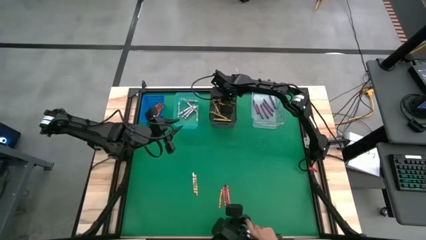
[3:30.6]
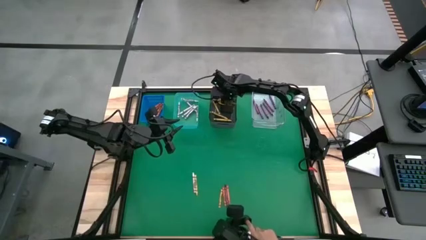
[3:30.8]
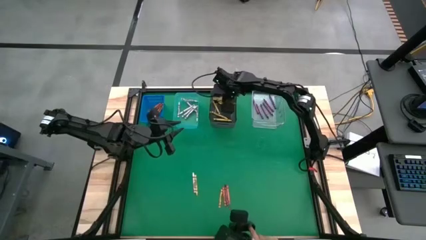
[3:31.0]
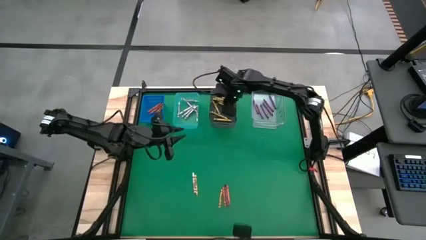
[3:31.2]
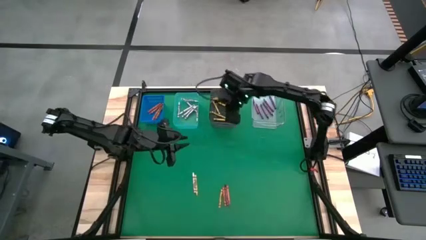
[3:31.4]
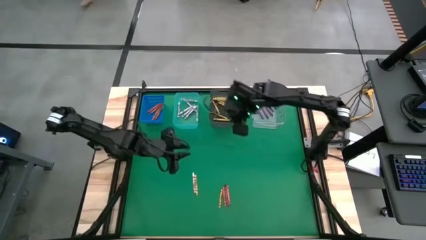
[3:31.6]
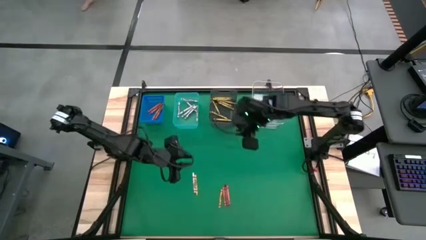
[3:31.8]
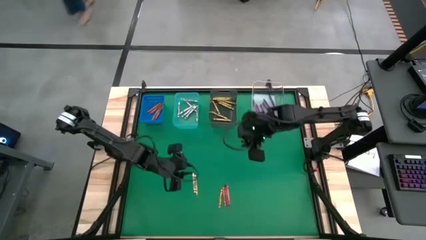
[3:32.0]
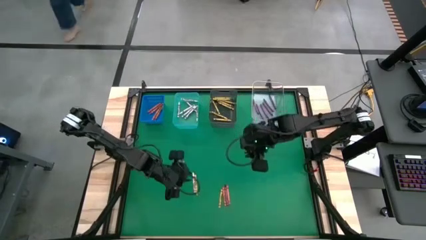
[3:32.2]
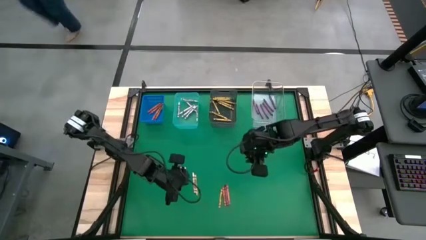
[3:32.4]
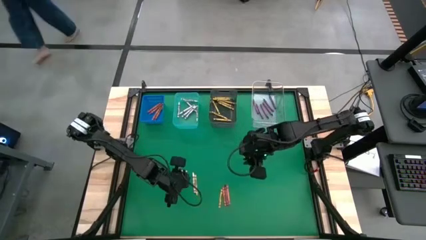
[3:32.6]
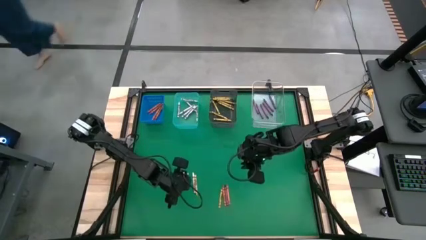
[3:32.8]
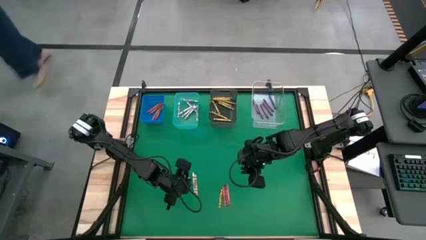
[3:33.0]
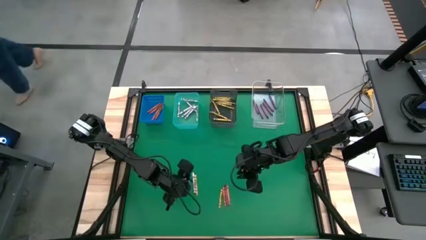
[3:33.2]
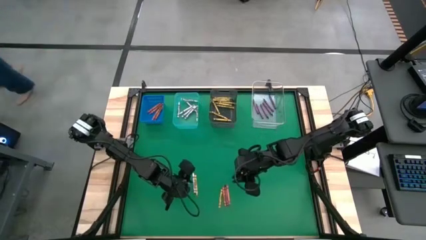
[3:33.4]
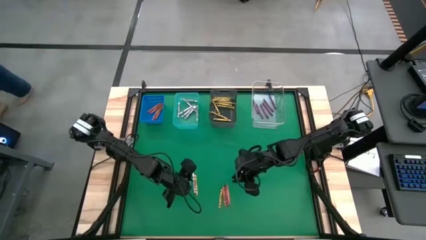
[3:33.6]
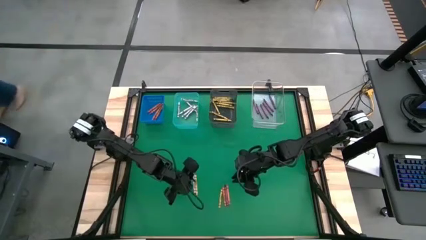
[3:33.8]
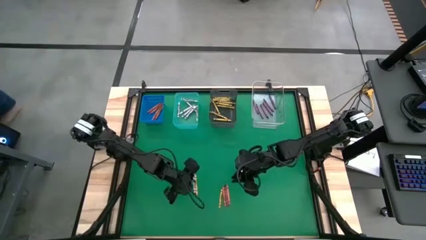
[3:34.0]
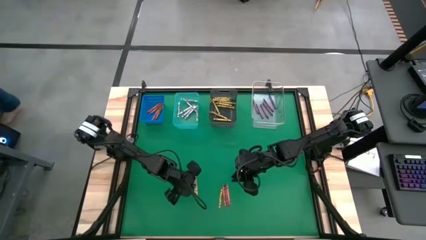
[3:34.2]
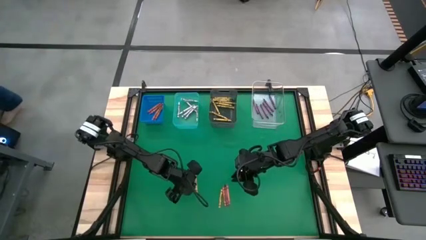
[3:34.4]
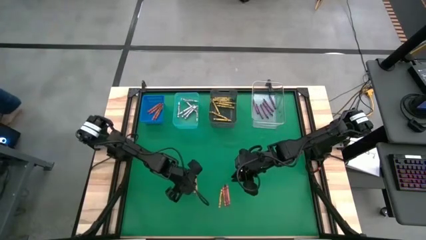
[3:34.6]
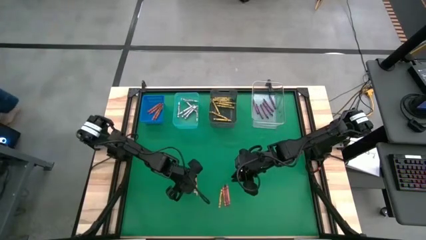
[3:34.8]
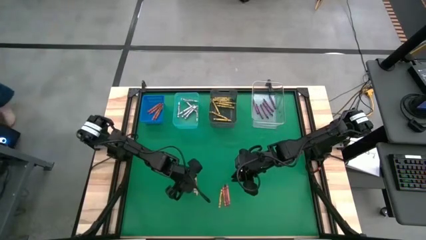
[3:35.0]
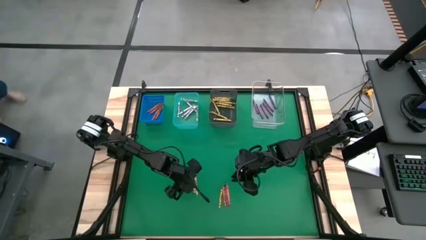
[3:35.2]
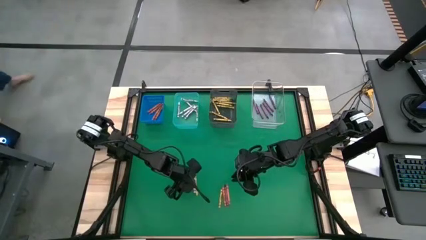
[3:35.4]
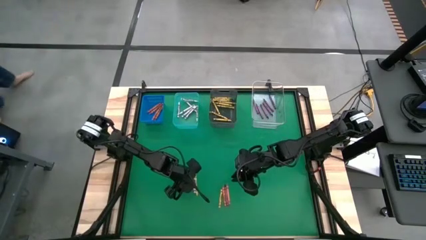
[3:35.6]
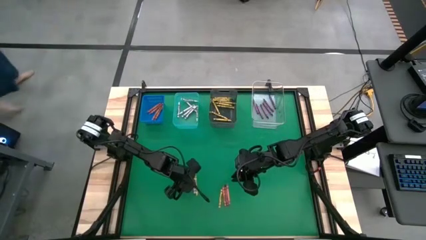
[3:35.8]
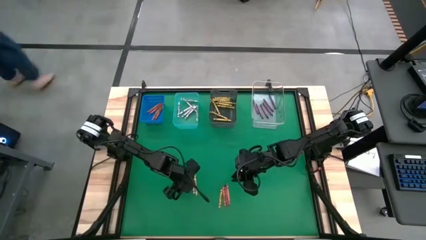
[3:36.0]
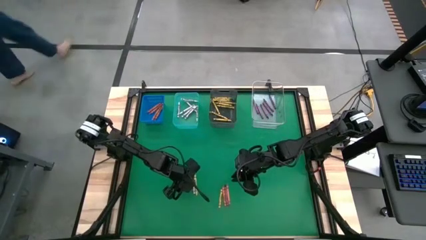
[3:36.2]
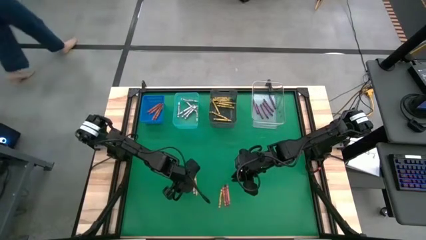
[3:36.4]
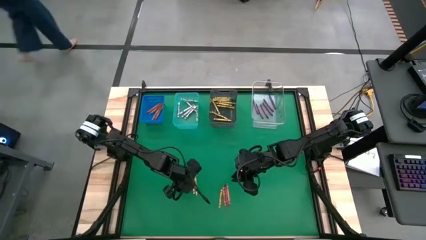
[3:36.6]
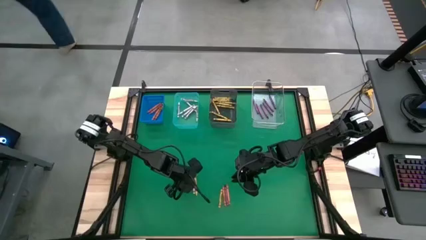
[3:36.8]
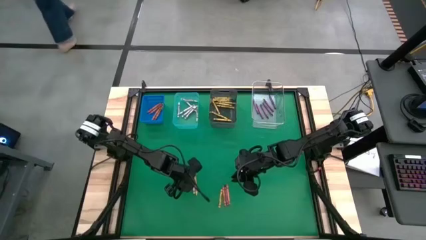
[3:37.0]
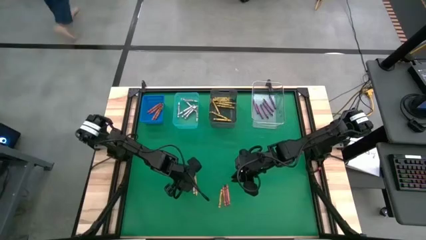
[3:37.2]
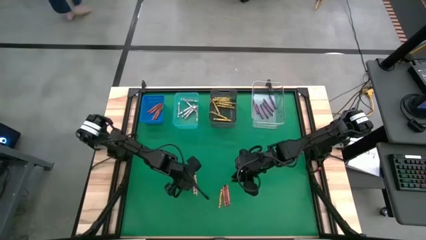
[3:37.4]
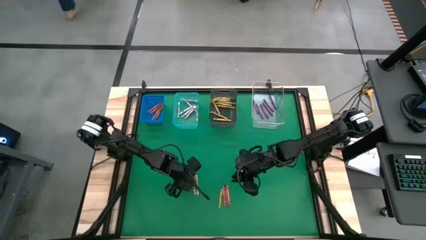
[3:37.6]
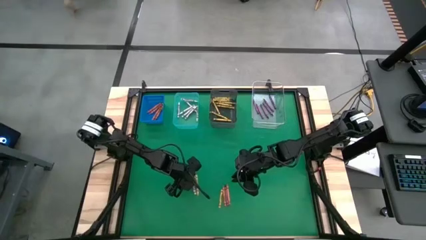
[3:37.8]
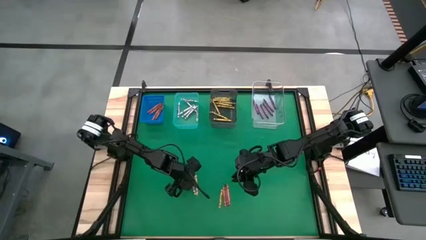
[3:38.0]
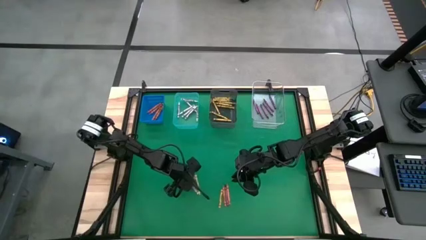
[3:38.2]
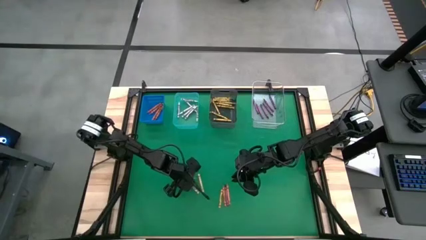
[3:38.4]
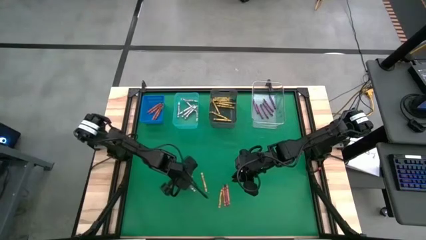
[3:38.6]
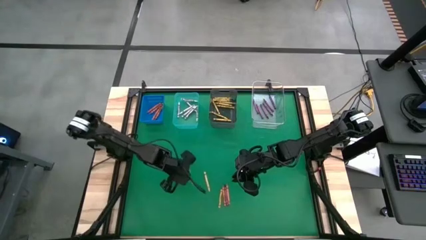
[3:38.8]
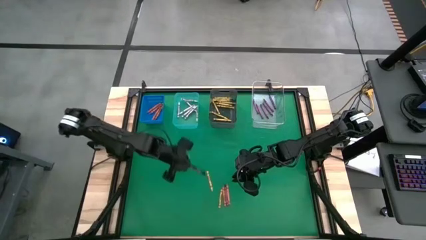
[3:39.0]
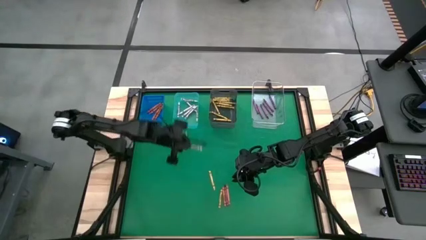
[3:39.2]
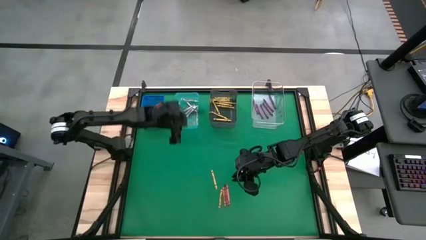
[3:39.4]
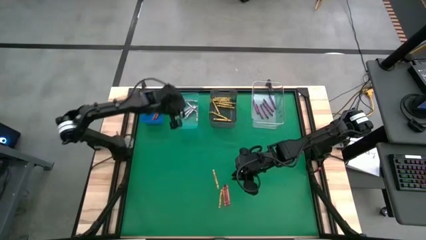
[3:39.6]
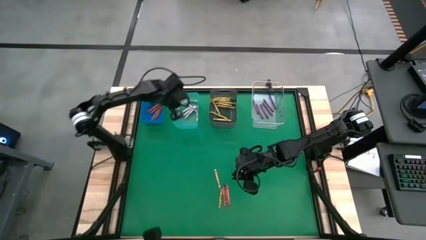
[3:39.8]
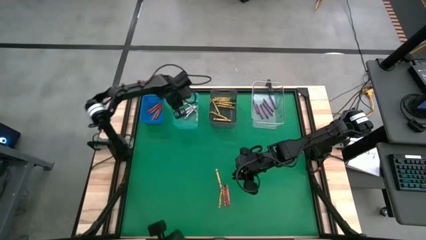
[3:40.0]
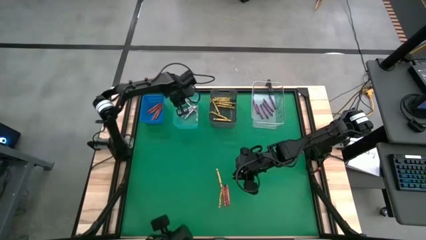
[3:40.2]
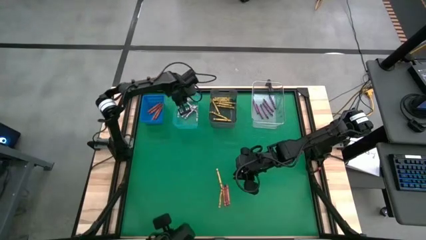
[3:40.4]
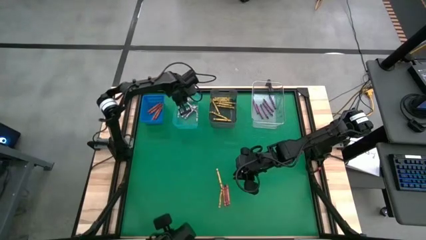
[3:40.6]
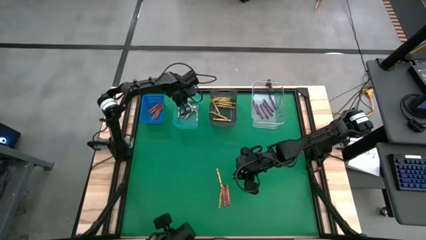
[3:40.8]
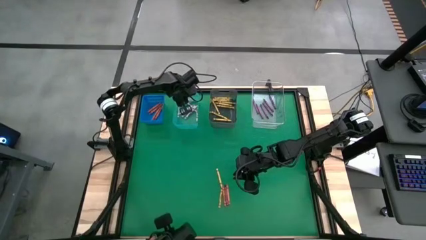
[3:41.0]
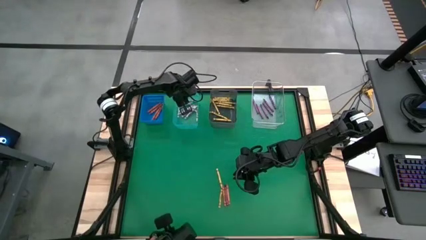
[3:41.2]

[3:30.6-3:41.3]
Task: Sort crayons
Put the white crayon into the light blue bin
